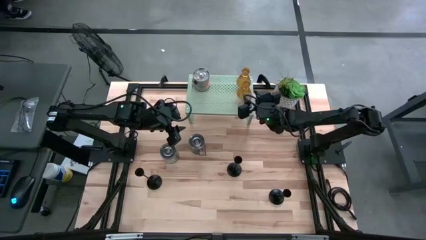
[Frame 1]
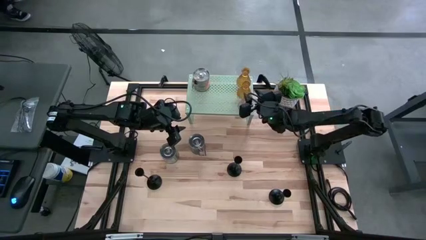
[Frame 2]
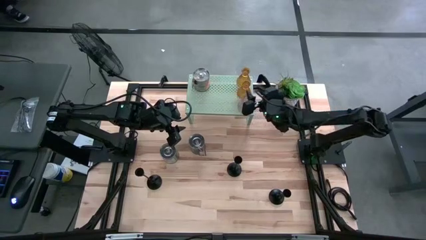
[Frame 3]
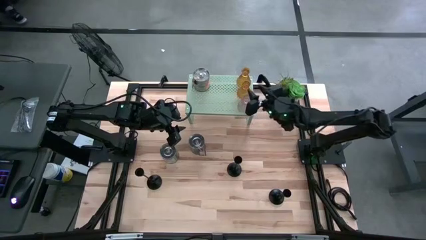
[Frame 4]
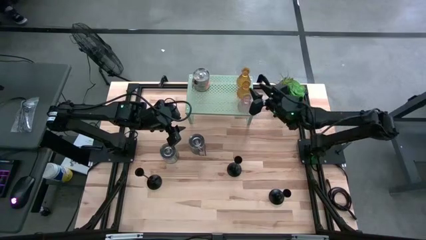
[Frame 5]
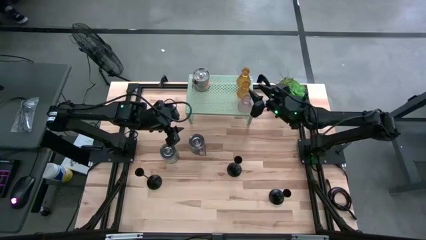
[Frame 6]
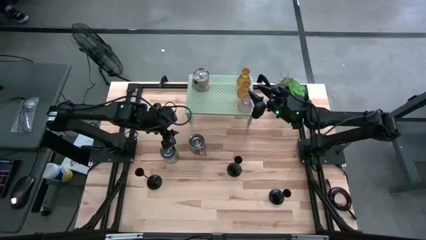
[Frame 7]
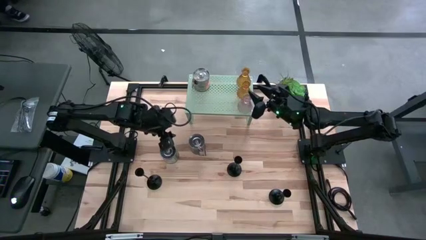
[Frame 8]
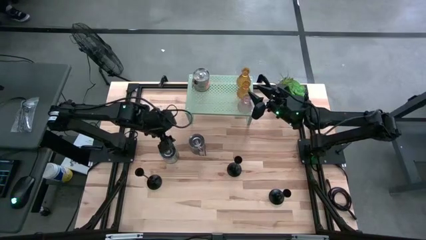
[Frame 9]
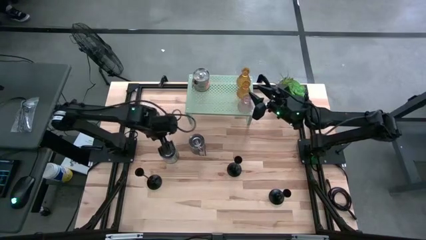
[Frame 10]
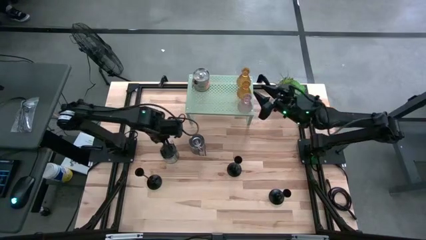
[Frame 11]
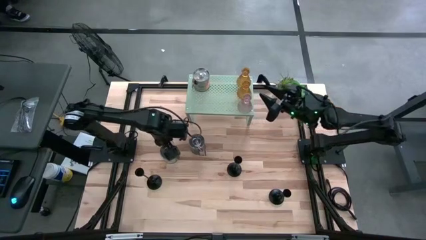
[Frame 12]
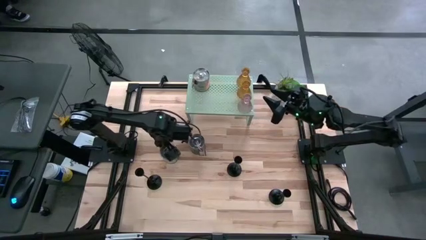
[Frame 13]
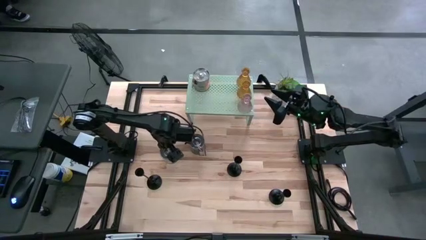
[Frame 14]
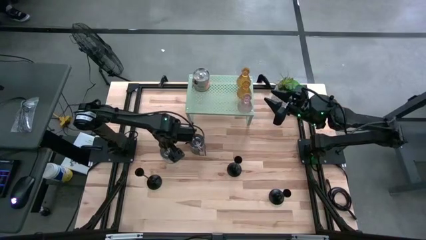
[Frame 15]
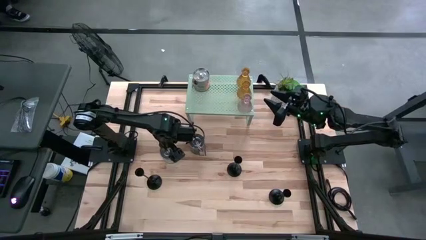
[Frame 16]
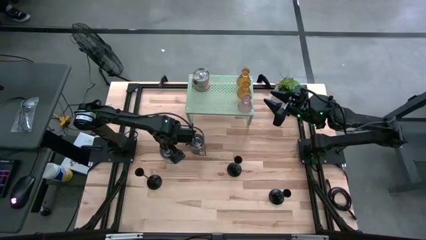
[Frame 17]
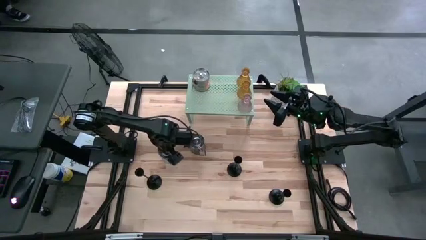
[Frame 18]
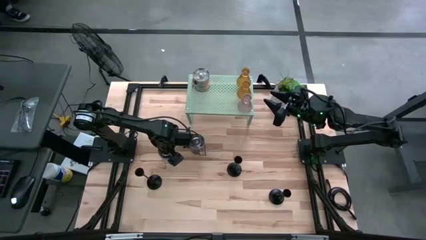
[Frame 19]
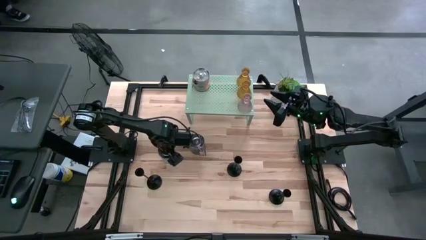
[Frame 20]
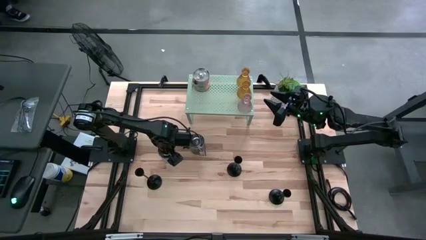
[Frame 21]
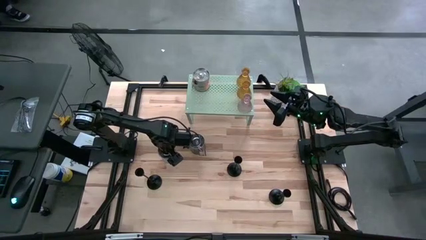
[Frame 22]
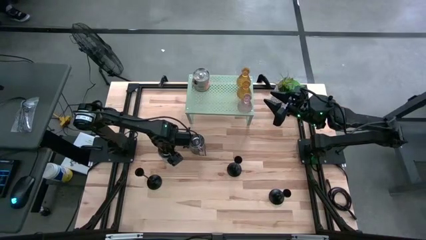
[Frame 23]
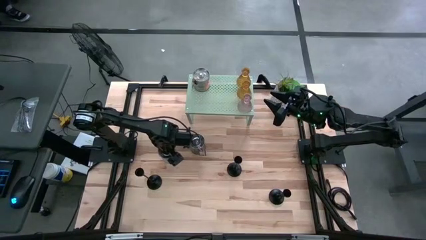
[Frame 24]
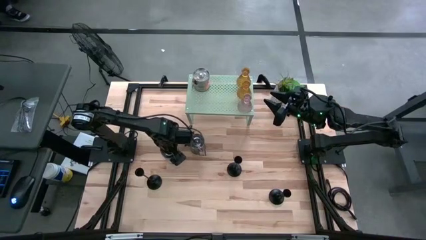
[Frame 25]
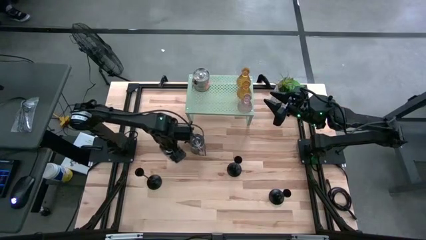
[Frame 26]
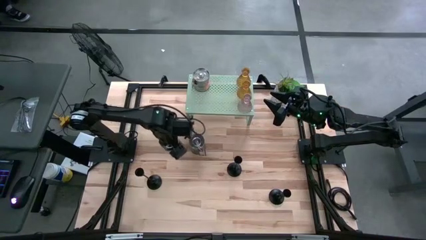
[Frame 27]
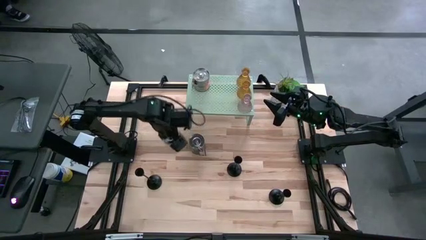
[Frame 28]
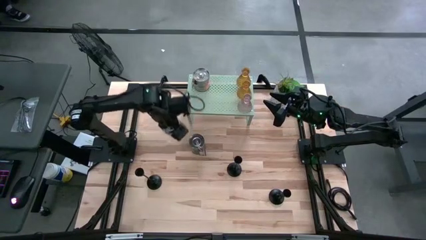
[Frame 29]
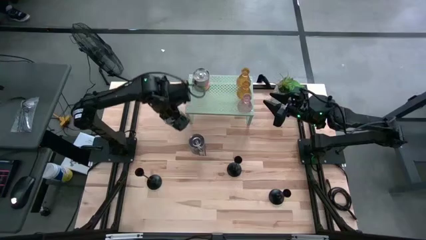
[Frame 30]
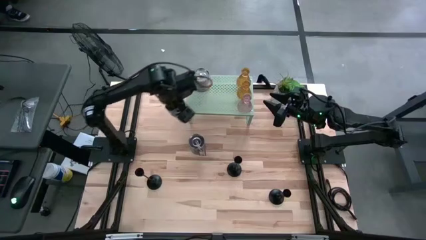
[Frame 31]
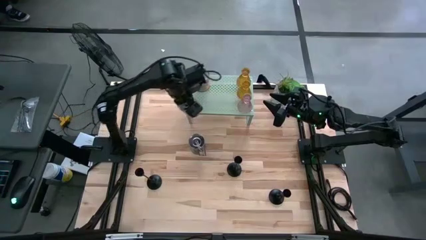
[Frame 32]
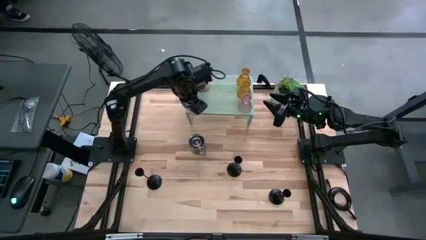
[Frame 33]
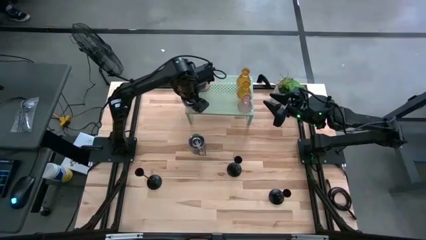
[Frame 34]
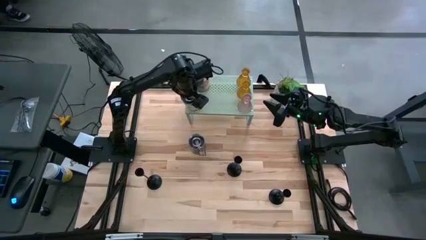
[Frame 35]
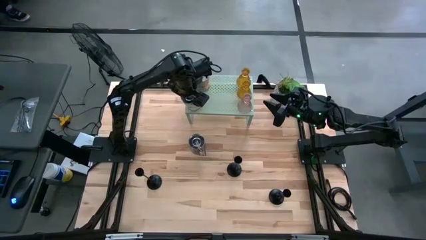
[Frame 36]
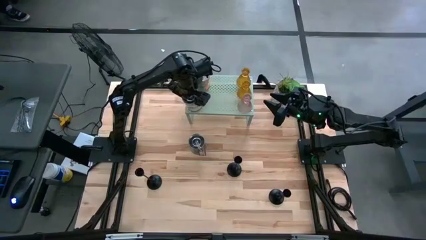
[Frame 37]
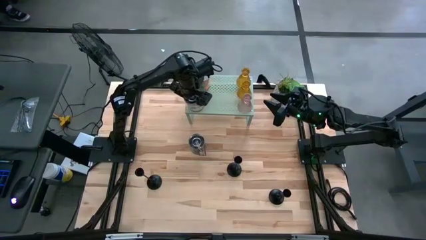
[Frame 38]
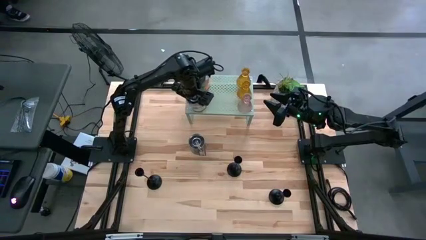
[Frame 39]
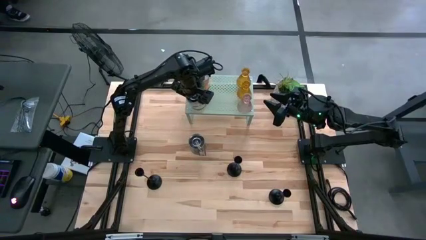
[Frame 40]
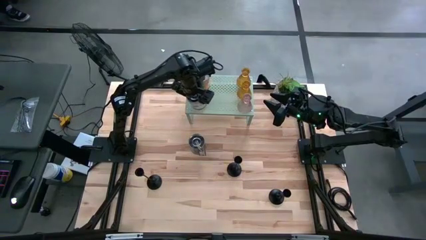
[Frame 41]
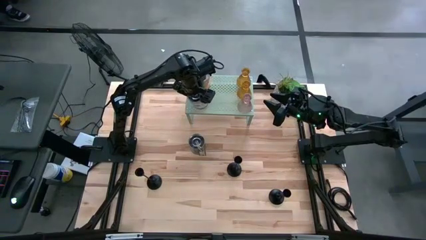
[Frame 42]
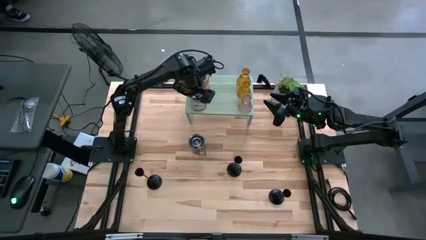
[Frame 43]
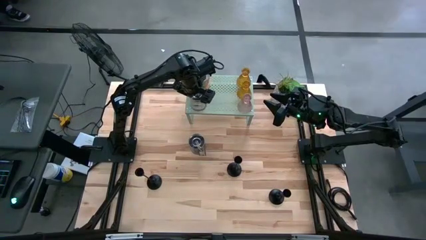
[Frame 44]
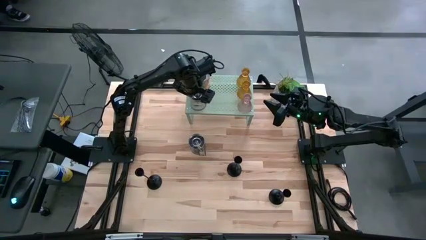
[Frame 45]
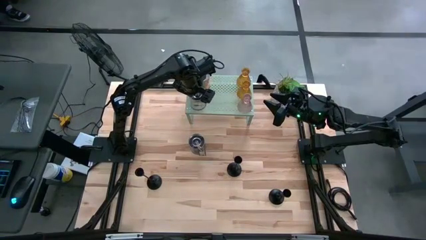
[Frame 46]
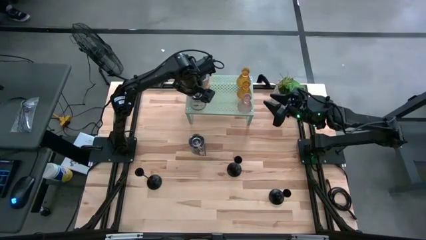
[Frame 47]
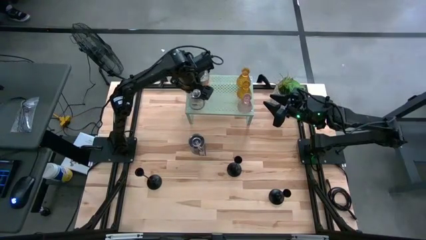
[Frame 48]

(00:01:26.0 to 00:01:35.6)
Task: Pick & Place candle stick holders
Put the green scented candle on the shelf
